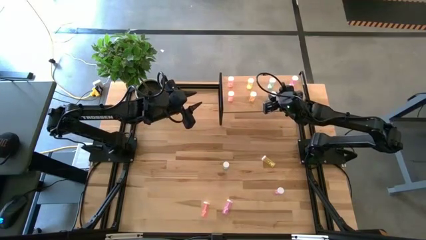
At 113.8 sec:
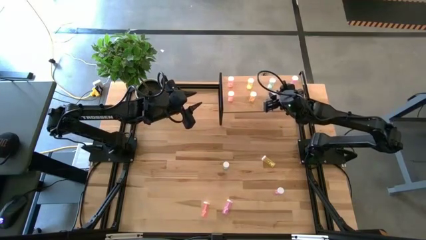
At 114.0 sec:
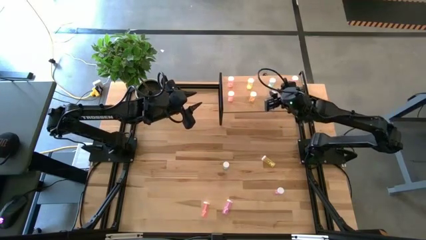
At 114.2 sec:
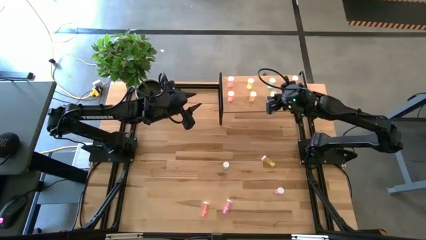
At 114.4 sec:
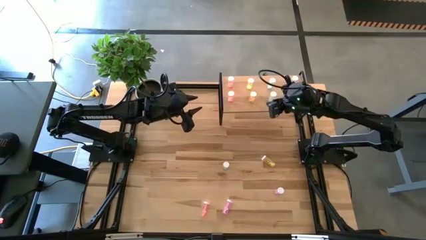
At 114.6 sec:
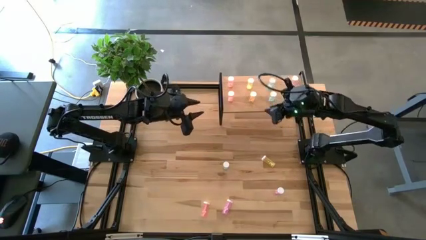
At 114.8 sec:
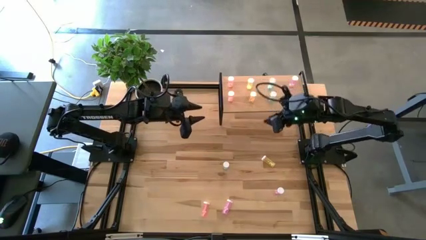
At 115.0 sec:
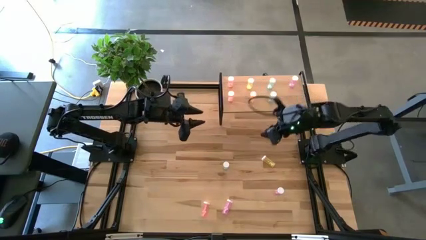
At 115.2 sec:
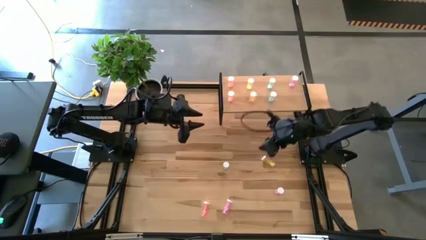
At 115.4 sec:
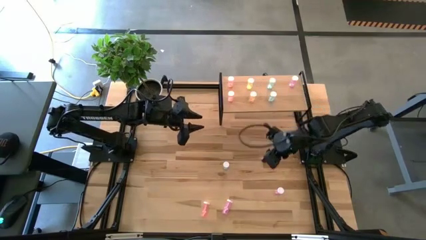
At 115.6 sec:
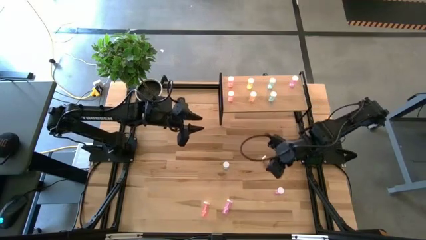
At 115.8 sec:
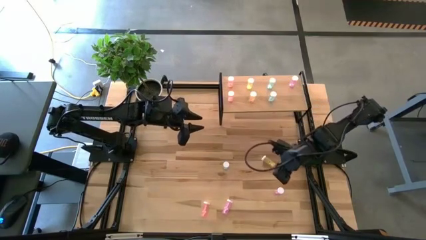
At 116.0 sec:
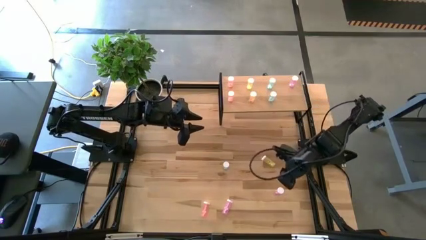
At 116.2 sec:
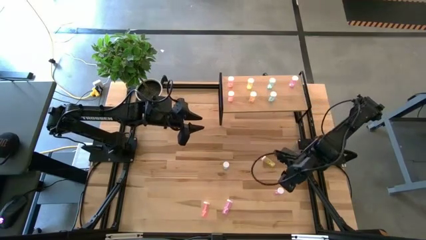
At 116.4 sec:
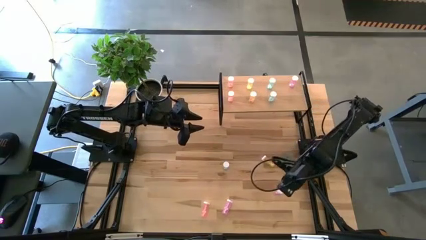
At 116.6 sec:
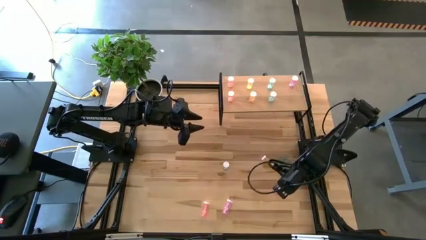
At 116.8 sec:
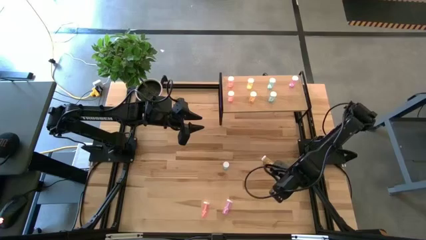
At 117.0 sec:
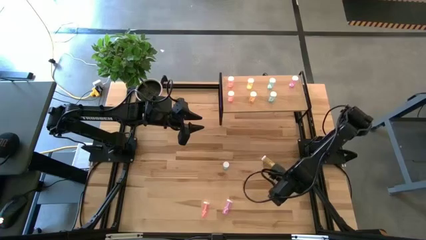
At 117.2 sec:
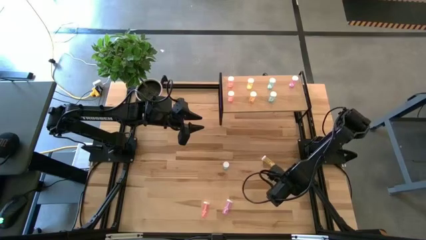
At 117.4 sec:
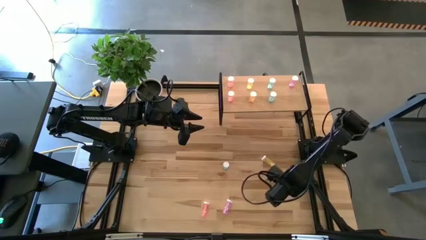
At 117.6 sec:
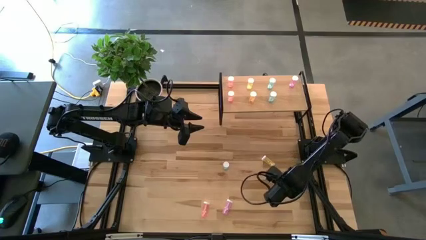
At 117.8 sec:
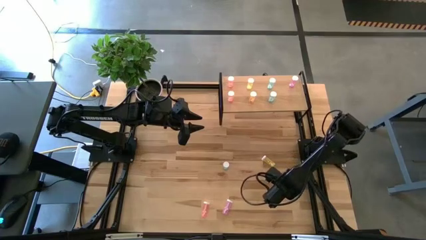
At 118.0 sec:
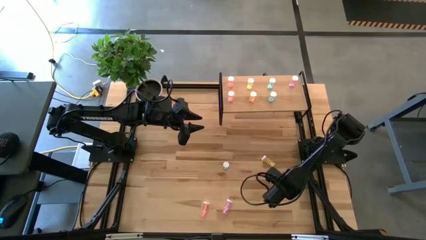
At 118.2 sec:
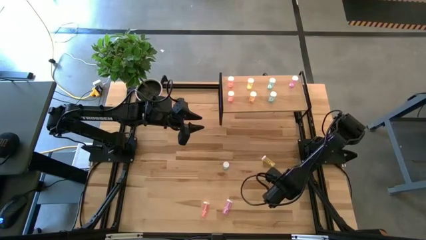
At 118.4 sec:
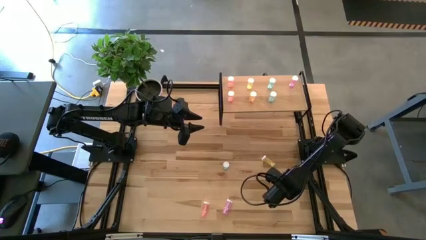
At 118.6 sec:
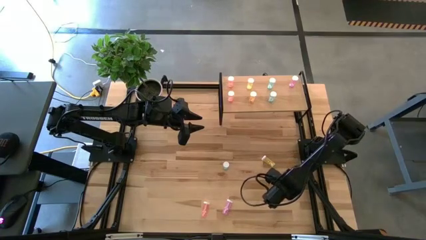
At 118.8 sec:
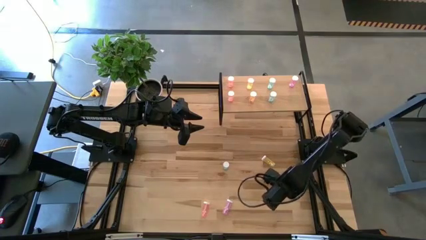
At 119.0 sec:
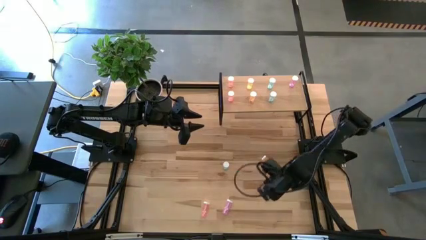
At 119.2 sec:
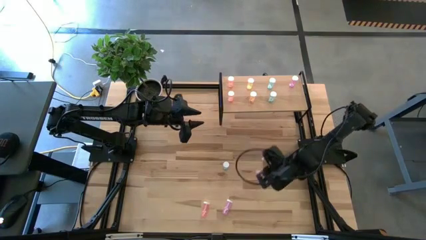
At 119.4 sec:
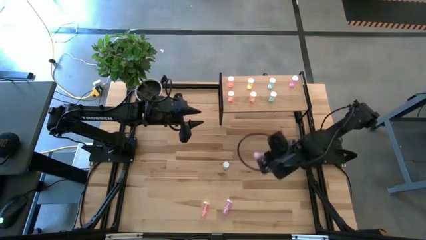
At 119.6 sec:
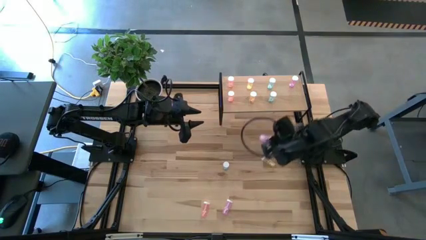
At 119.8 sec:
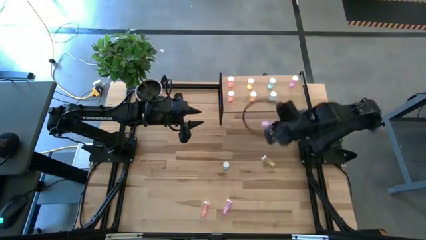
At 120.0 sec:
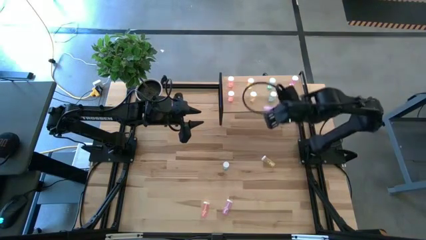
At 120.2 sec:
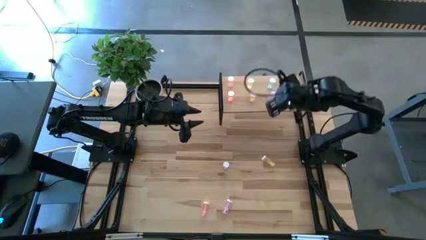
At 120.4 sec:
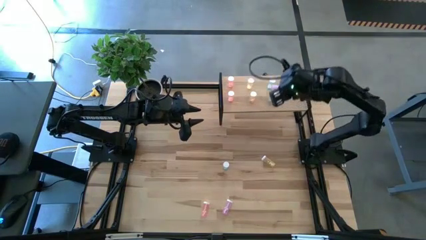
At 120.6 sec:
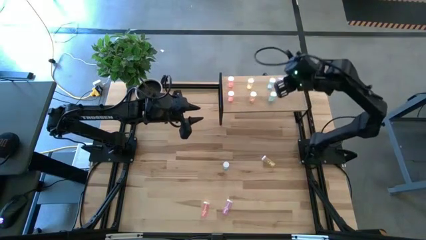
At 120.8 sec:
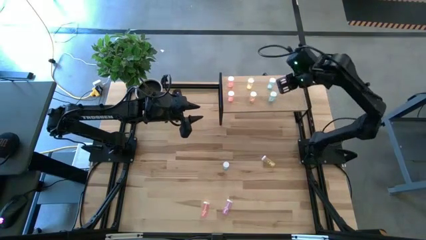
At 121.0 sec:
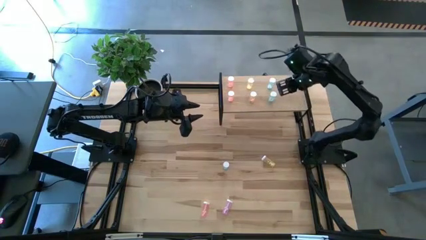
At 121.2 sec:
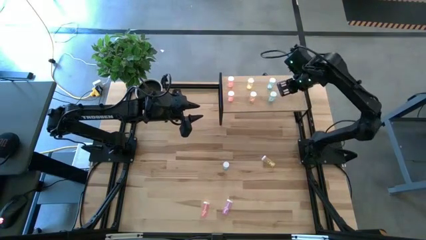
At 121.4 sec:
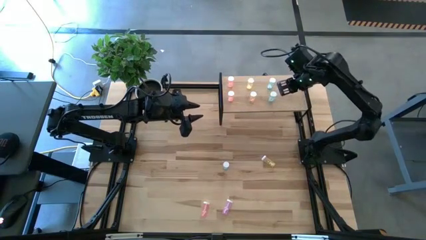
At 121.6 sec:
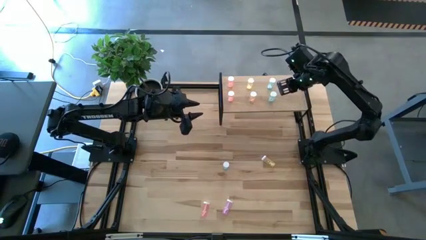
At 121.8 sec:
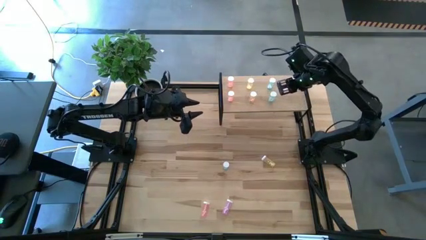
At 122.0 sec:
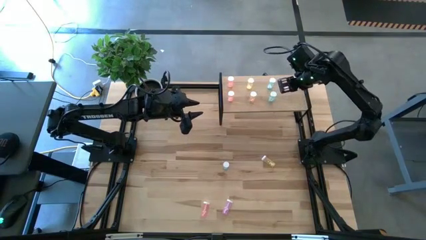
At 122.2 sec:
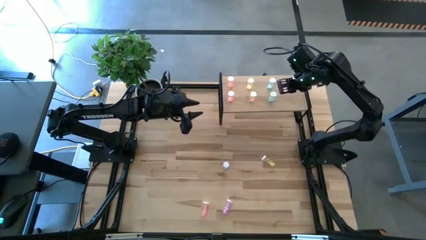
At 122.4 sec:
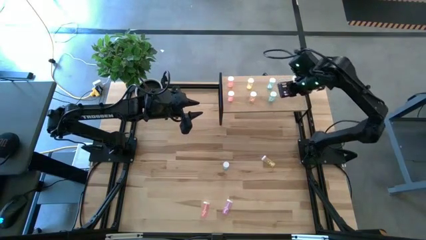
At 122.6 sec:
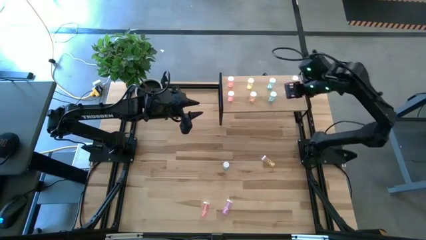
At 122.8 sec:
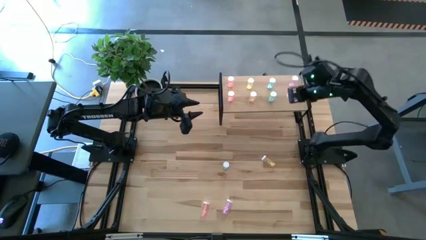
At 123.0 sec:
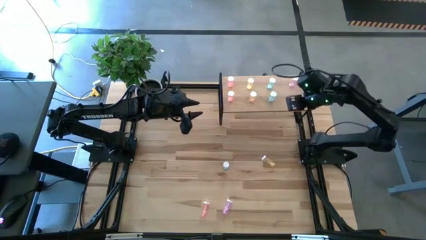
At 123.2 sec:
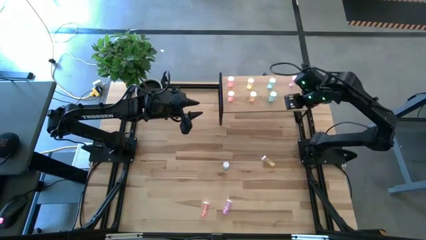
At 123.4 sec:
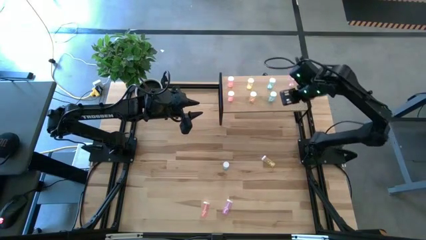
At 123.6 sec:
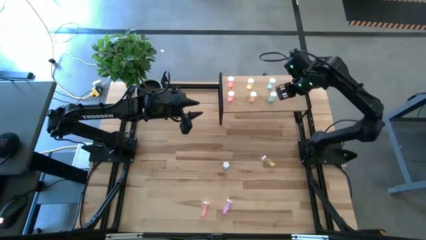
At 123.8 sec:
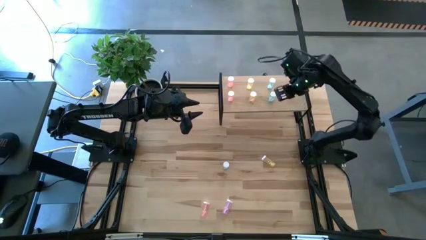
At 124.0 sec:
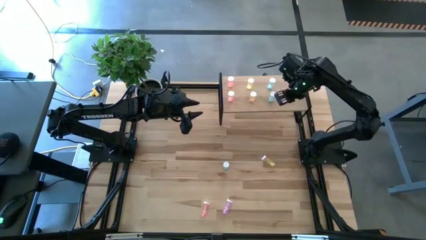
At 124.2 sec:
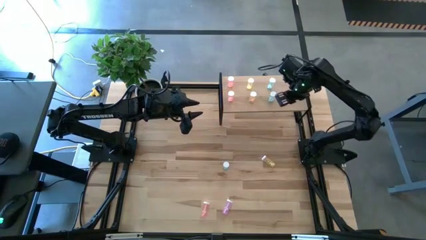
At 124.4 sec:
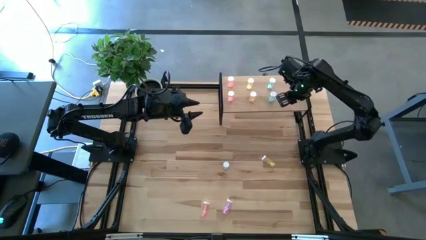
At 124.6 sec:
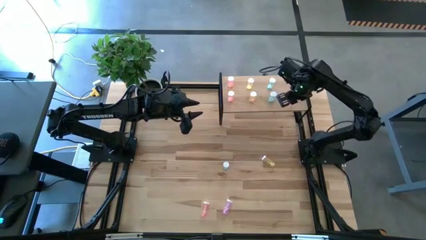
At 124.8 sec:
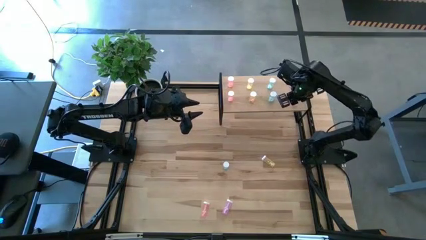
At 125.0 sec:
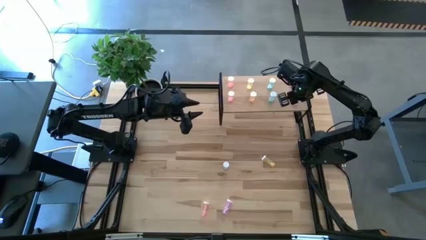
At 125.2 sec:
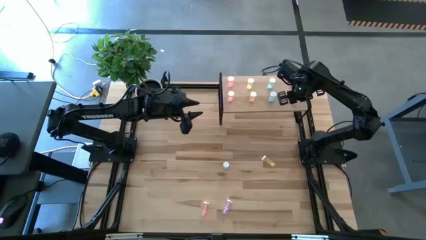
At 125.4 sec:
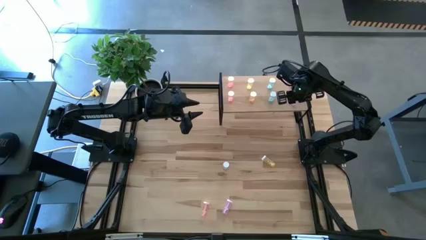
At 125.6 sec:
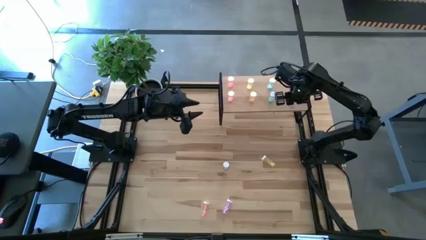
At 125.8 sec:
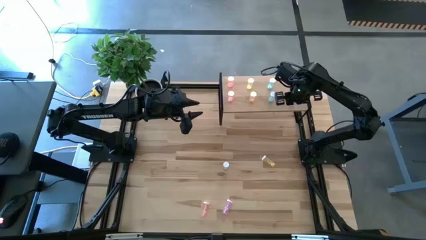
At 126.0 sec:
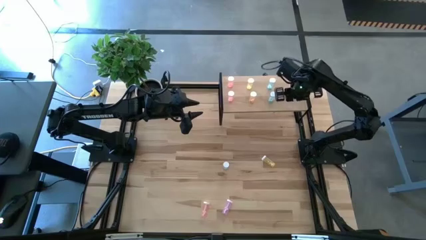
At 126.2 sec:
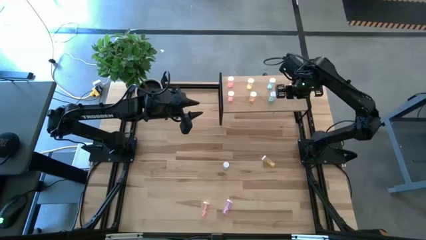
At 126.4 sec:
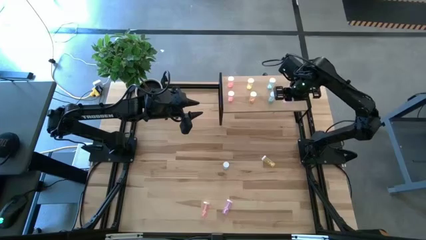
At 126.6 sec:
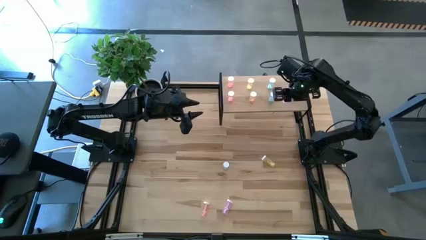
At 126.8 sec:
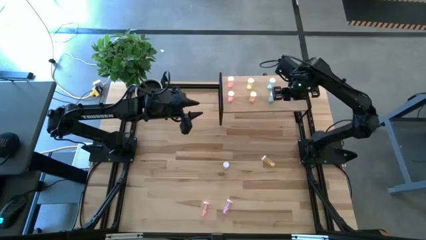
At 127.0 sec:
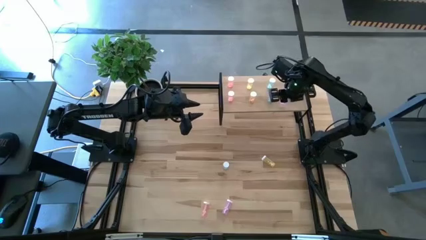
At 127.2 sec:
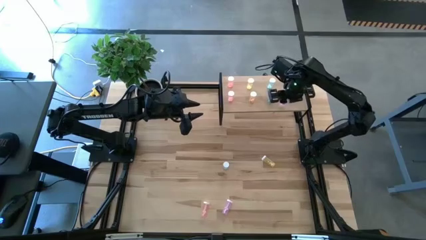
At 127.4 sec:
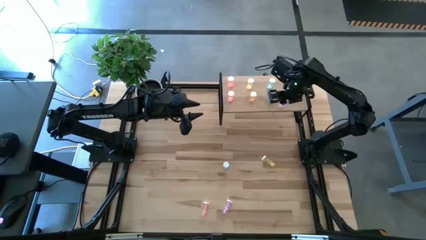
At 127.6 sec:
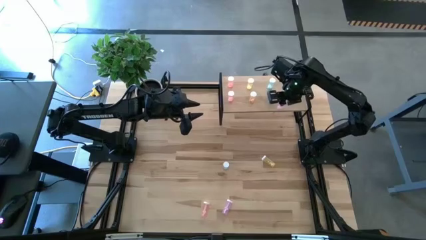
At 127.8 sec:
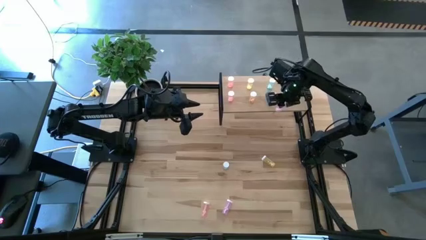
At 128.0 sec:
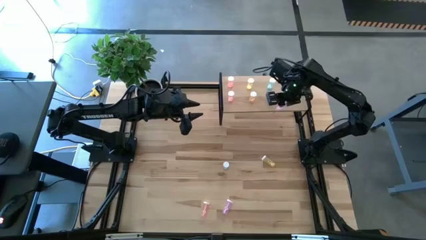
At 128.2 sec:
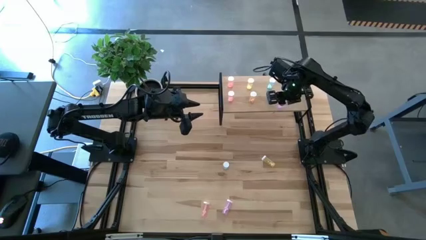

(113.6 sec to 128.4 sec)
Task: Pick and place medicine bottles onto shelf by color
Put the top purple pill bottle on the shelf aligned with the other purple pill bottle

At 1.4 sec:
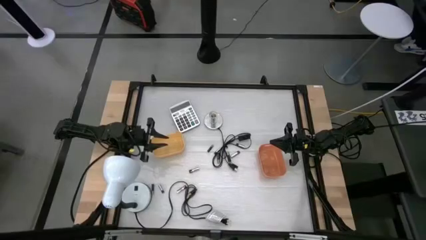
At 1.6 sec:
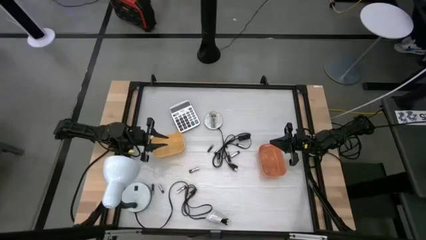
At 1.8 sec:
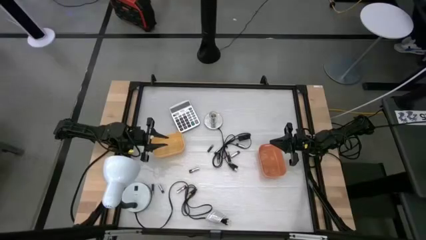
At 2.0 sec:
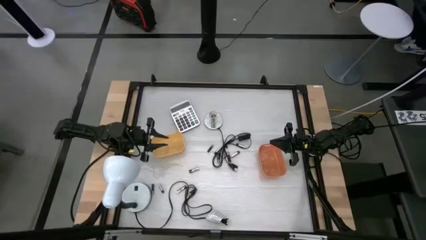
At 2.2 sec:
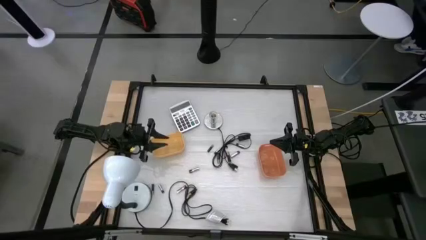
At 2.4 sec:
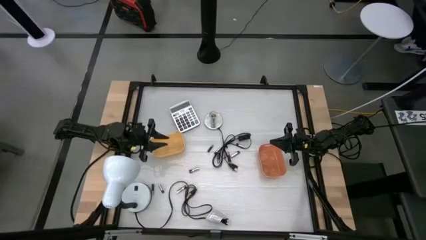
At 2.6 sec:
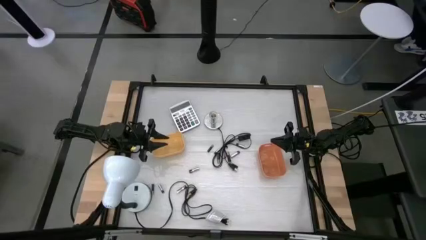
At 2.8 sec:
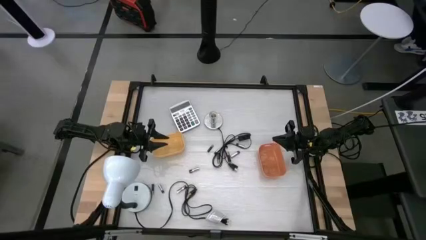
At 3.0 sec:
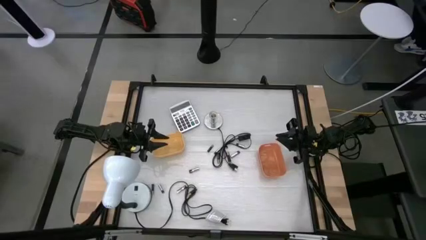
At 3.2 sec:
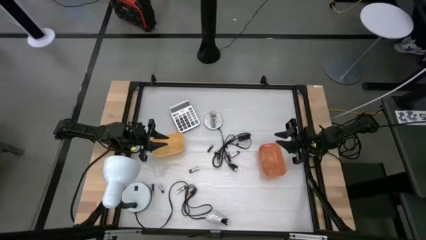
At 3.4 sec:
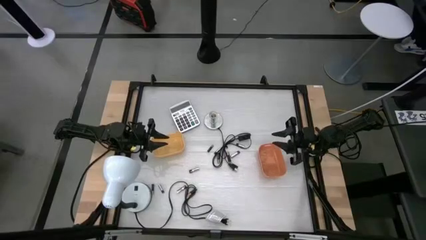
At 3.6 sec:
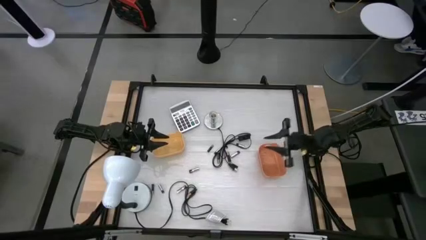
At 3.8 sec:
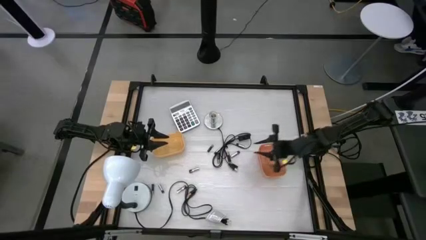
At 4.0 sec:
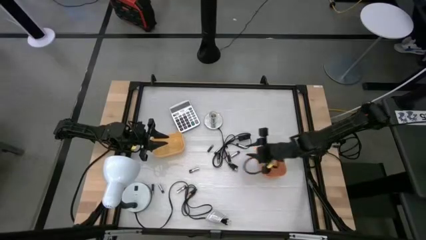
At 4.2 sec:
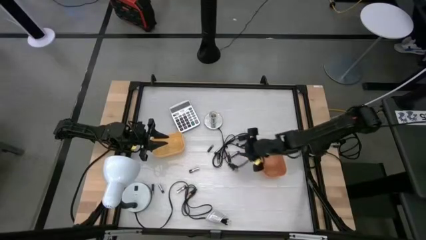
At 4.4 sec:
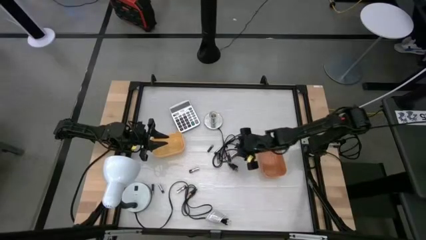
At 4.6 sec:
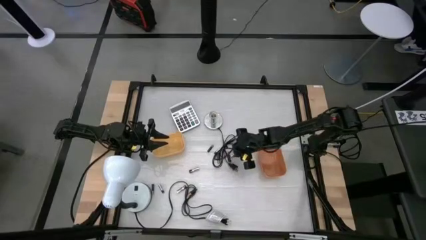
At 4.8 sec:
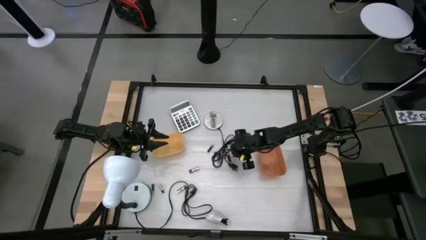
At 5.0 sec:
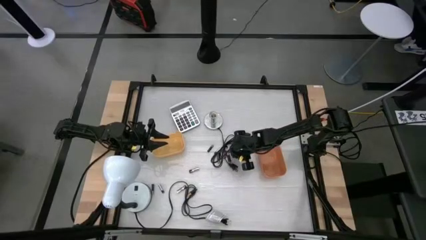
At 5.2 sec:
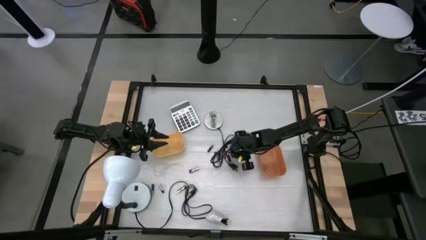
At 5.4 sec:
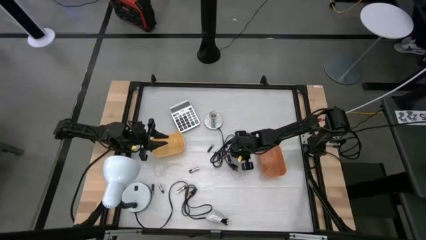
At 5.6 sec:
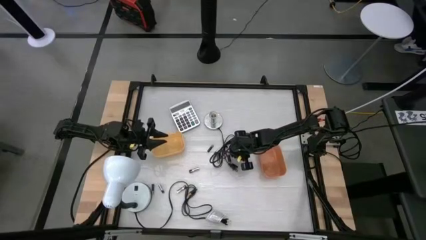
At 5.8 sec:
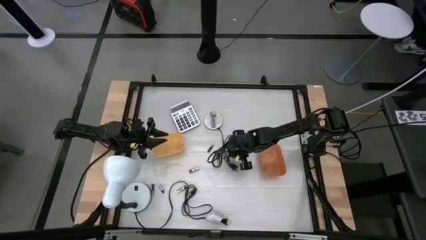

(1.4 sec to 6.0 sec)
Task: Sort batteries
Put the silver battery into the orange bin
